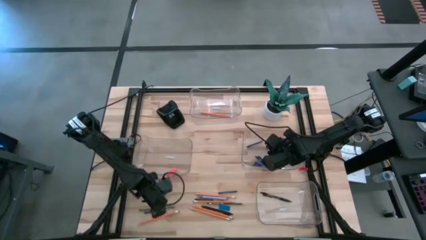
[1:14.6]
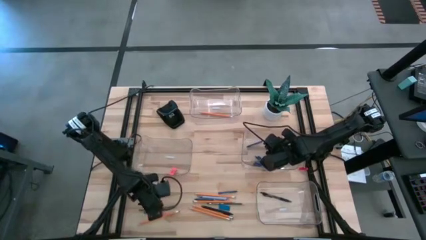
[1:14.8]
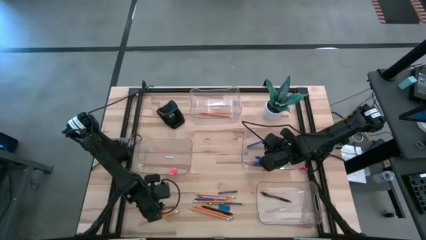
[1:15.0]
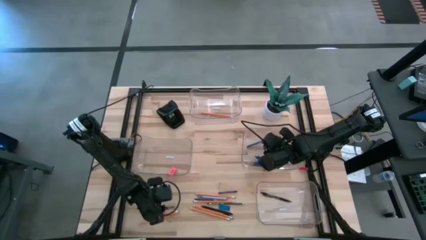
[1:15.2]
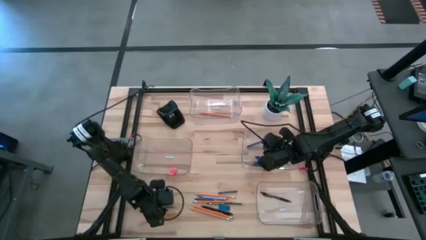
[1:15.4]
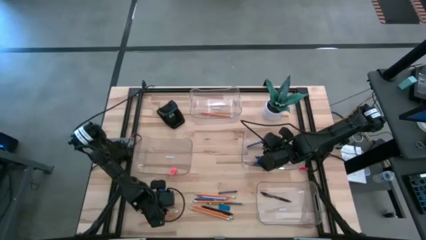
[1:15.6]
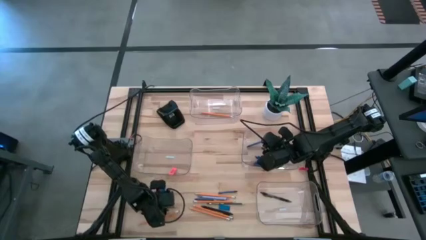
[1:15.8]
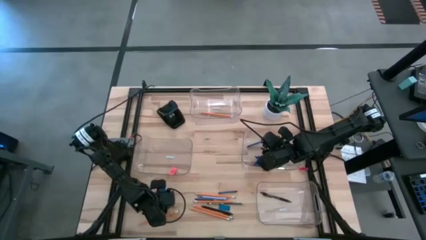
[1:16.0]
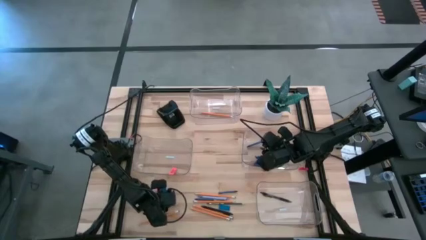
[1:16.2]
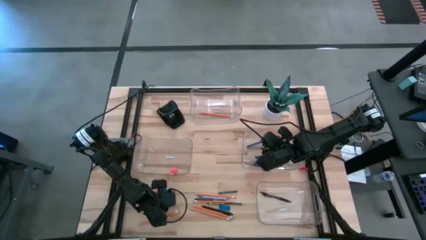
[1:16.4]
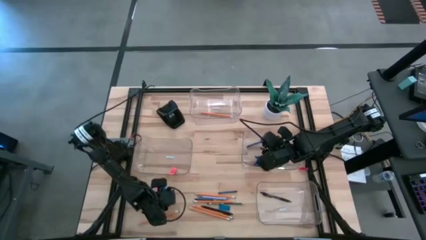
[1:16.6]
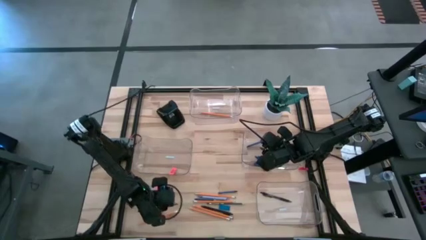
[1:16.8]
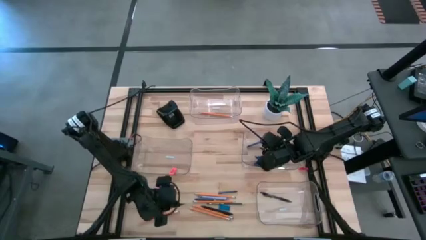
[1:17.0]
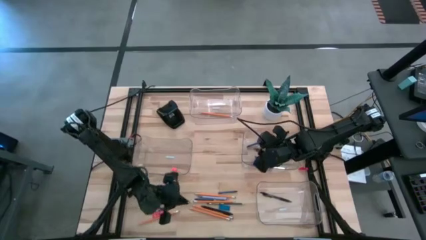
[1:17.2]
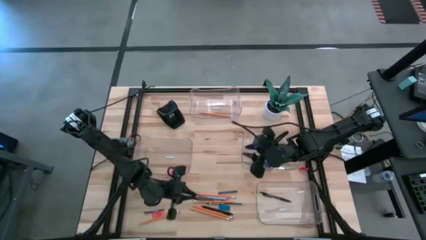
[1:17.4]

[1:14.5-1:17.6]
Task: Sort crayons/erasers/pens/pencils in bins
Put the black pencil into the top transparent bin

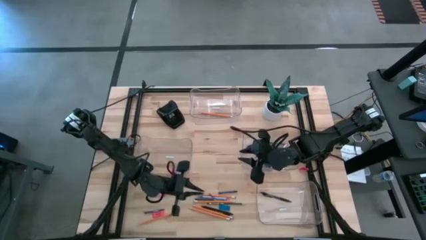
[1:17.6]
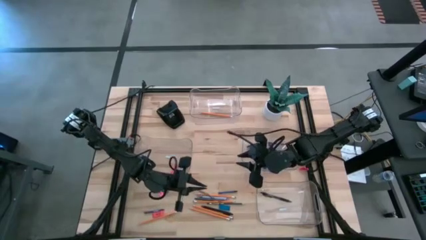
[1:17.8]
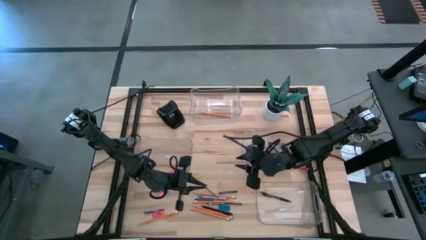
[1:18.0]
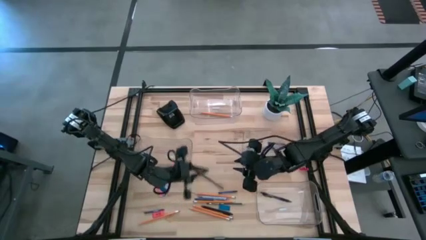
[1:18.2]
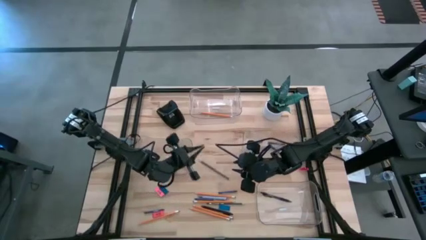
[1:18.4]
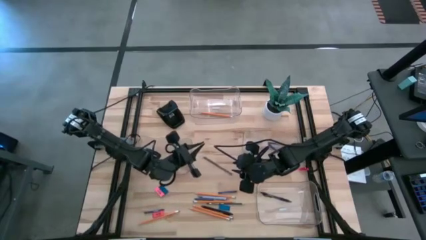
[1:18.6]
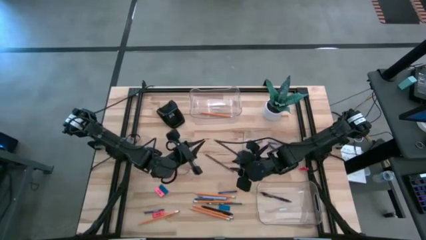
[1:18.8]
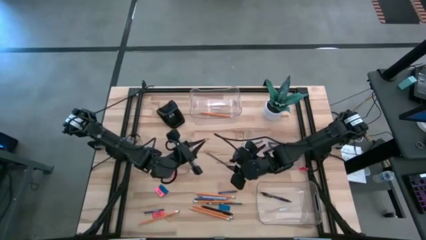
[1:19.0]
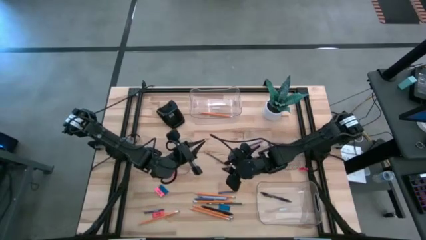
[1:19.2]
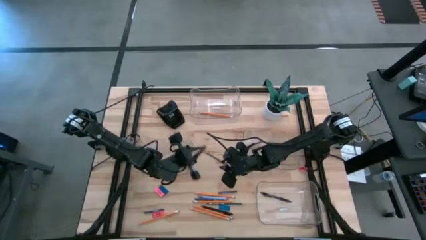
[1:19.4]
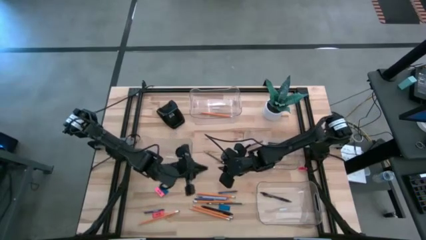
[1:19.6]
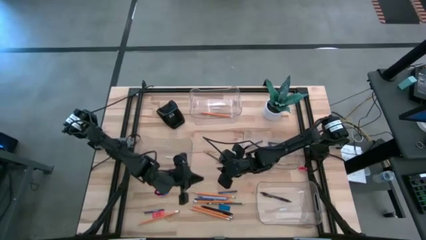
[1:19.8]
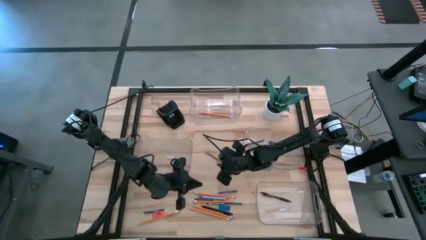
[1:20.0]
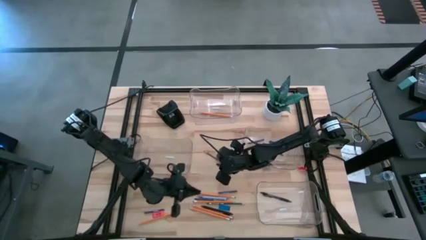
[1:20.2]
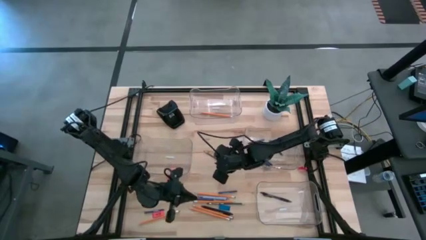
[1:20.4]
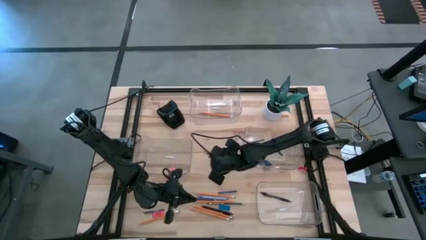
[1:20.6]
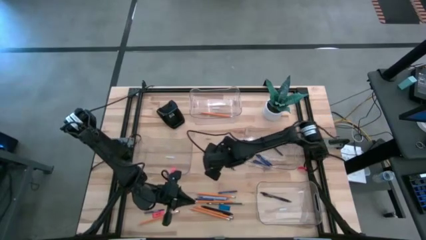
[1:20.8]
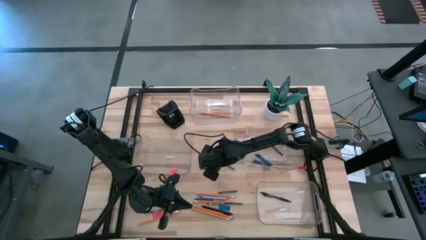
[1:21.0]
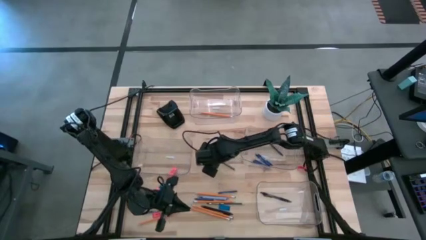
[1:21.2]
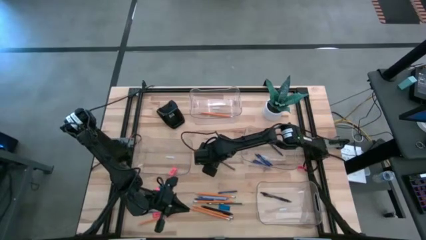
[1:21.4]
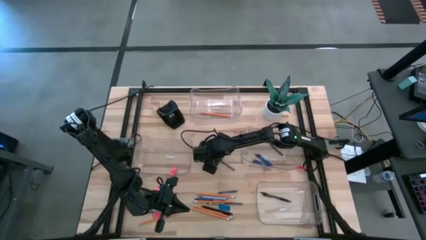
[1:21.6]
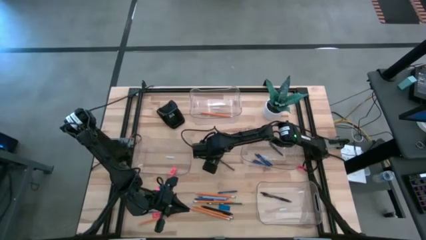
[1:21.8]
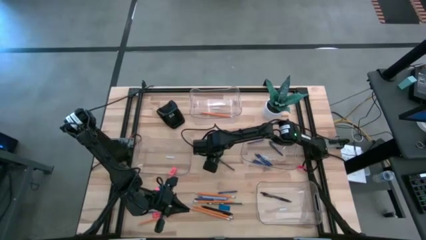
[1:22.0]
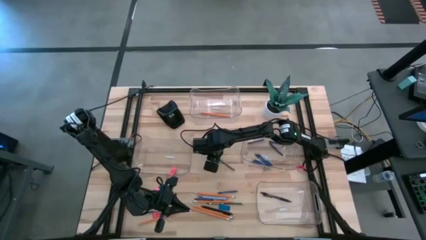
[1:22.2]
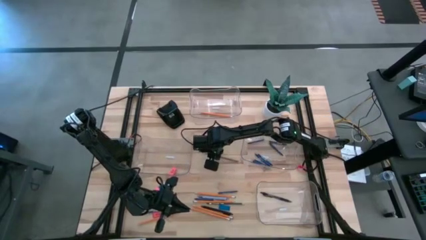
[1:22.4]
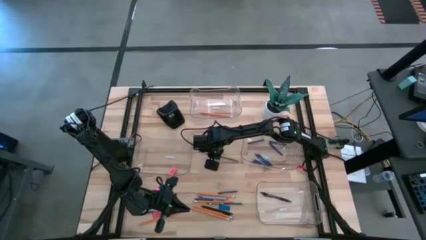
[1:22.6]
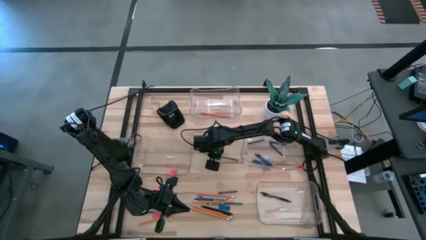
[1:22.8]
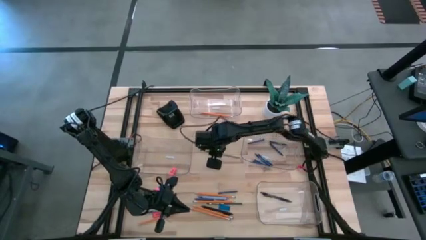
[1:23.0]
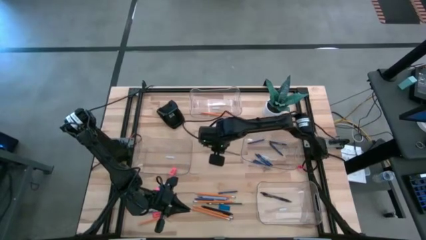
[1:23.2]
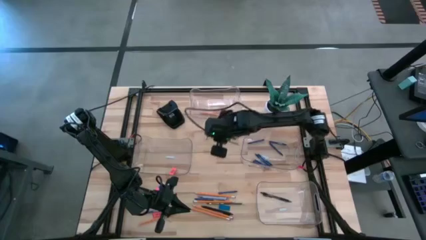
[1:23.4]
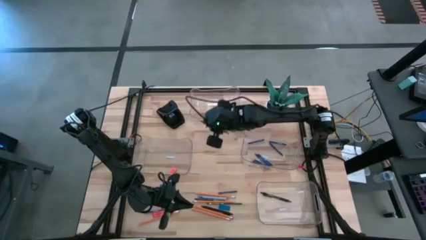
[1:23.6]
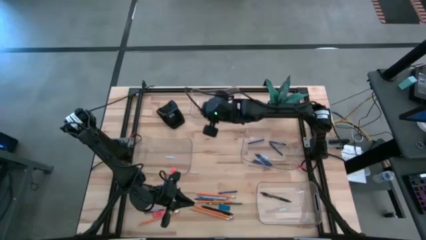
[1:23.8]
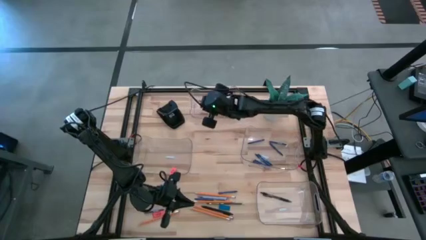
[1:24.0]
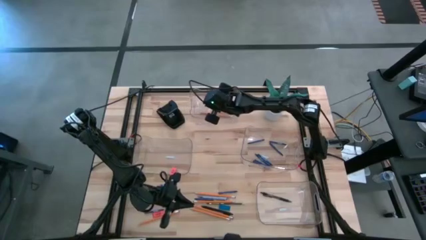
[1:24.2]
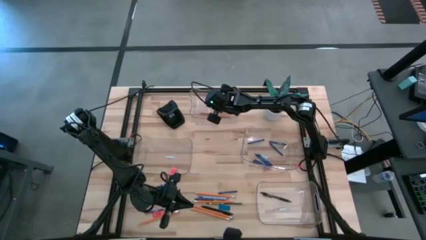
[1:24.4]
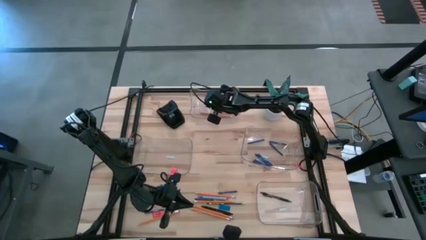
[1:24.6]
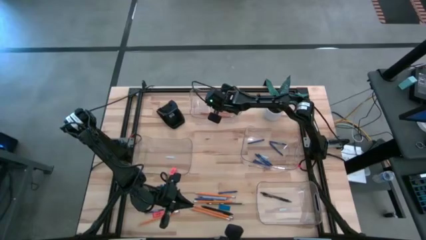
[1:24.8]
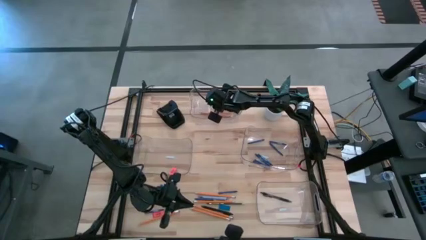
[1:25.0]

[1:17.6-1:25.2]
Put the black pencil into the top transparent bin

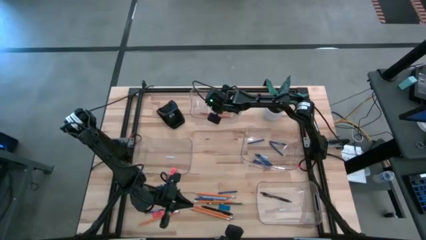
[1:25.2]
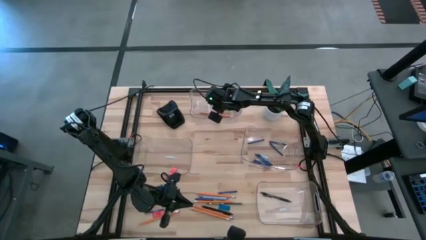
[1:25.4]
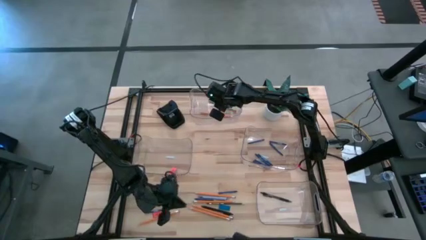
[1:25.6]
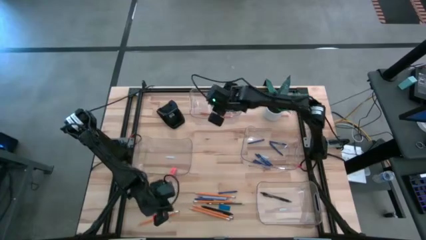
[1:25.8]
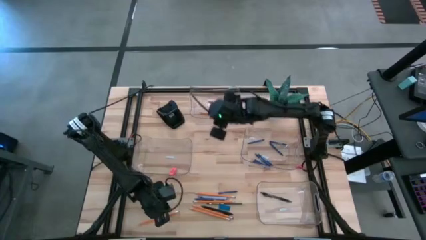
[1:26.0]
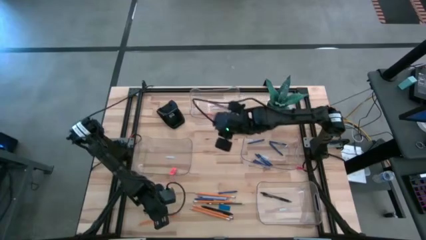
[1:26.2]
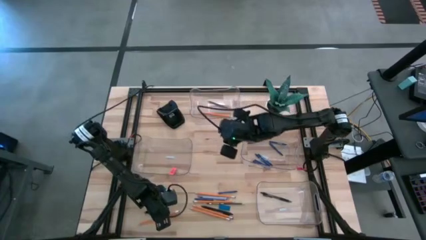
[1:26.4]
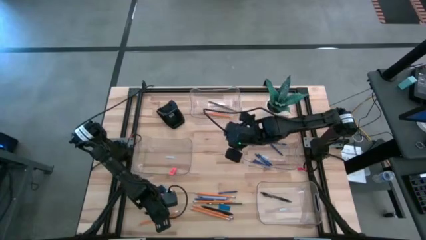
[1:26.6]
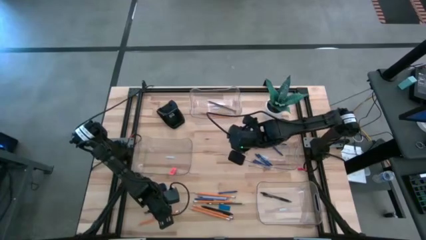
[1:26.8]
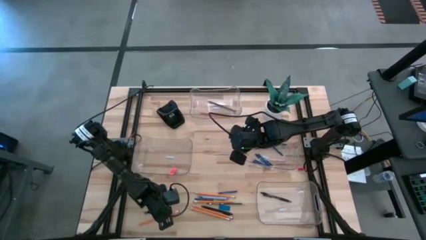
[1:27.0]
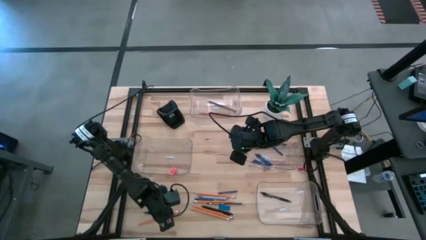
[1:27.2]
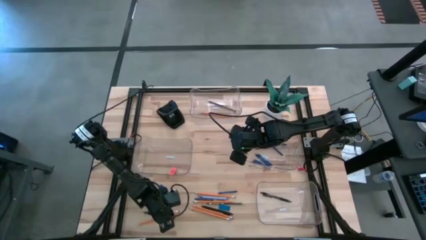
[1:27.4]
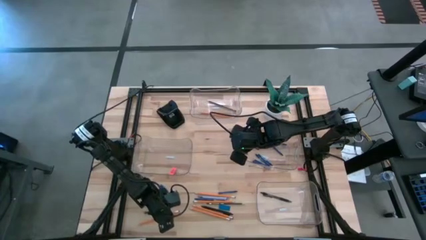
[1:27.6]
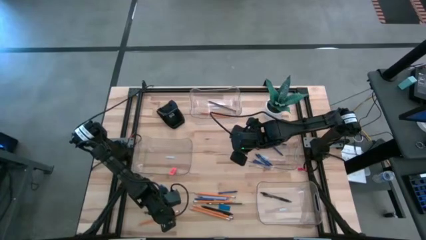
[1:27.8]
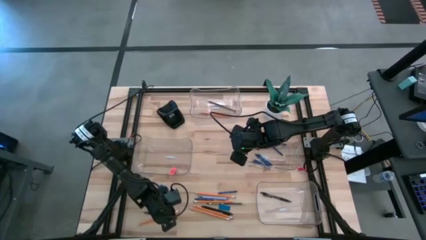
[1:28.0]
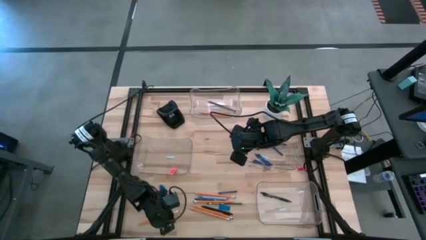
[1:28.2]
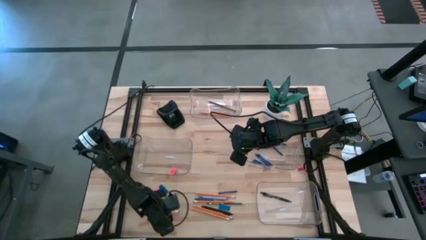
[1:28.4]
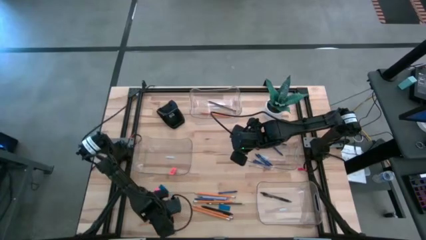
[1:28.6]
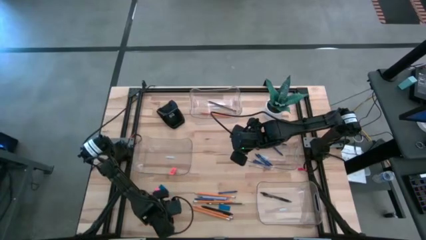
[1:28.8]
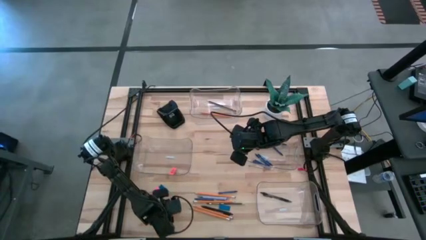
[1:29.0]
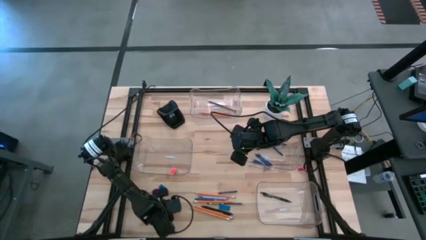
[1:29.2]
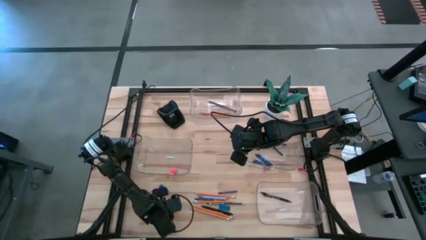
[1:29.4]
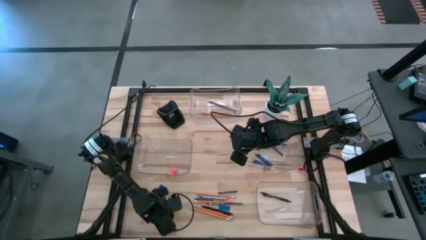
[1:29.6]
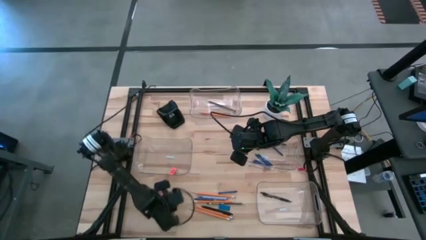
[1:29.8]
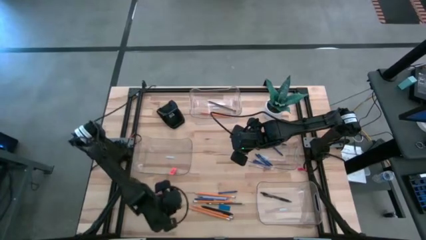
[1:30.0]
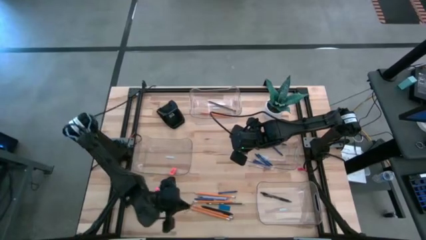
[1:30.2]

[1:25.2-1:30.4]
Put the yellow pencil into the top transparent bin

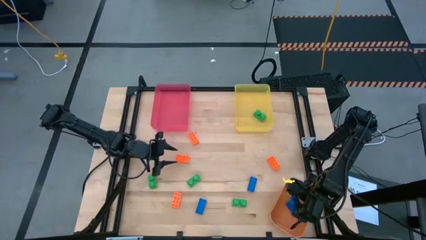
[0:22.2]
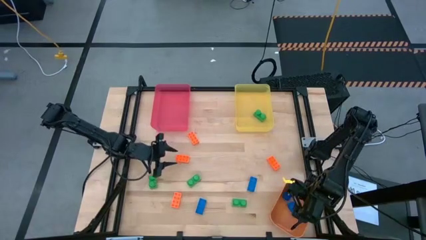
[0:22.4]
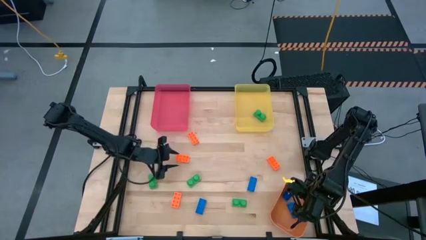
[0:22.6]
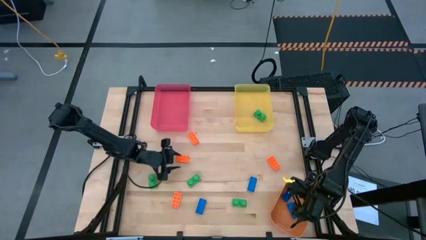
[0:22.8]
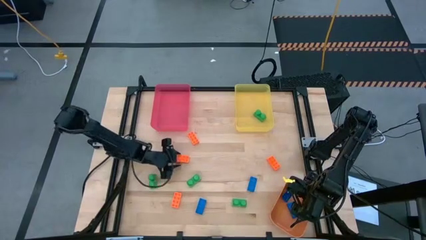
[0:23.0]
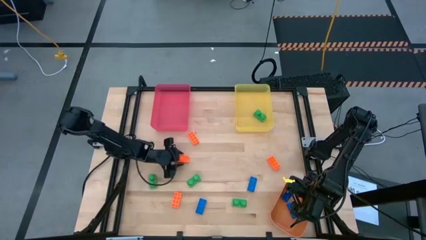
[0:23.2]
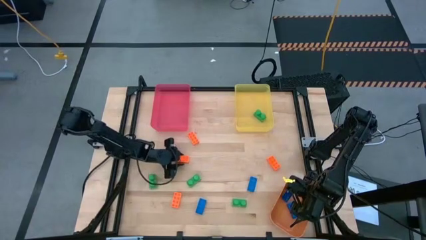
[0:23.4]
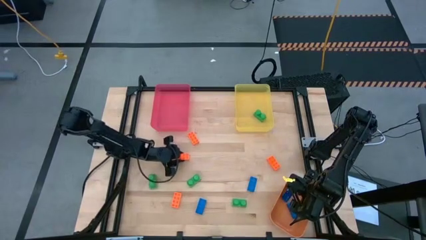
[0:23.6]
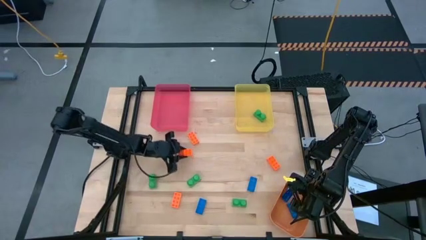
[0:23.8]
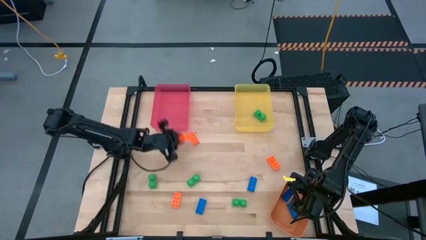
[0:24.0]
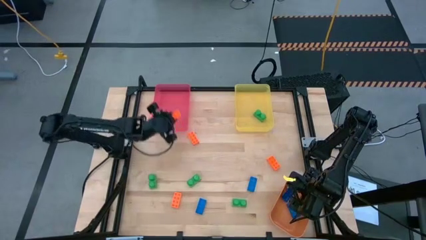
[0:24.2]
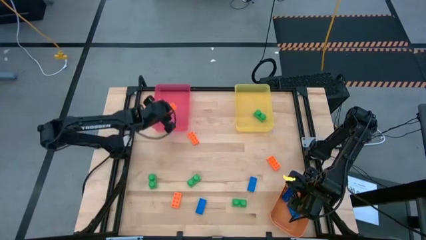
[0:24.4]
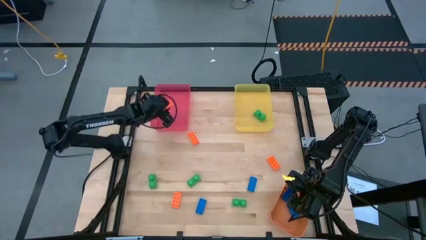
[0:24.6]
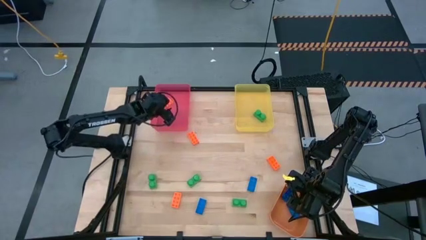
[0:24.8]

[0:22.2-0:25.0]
Task: Sort & place blocks by color
Put the middle left orange game piece into the red bin
